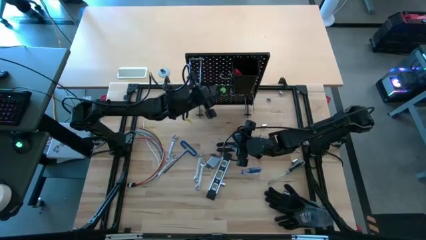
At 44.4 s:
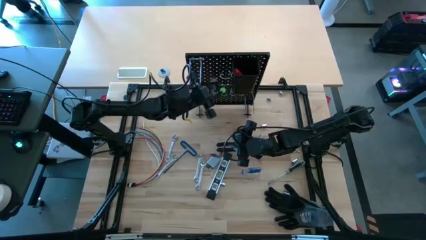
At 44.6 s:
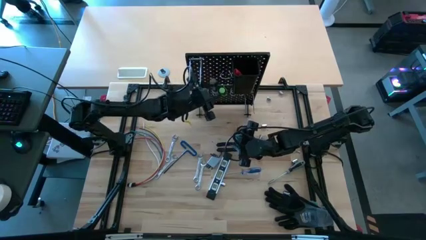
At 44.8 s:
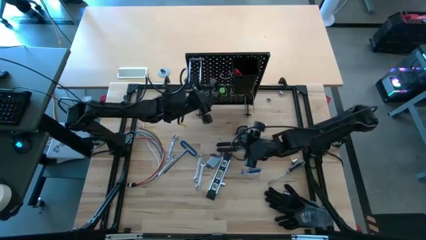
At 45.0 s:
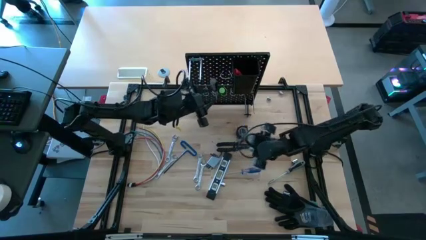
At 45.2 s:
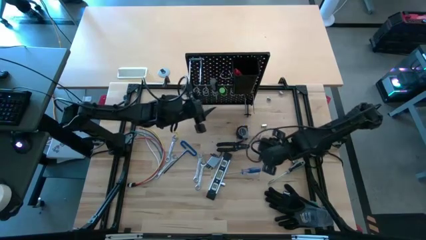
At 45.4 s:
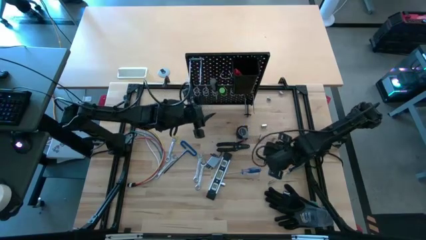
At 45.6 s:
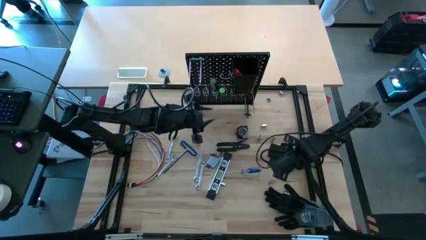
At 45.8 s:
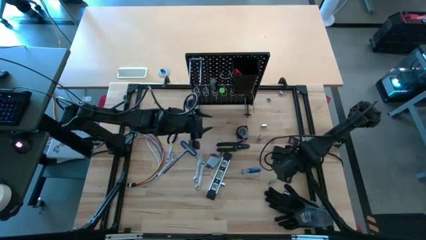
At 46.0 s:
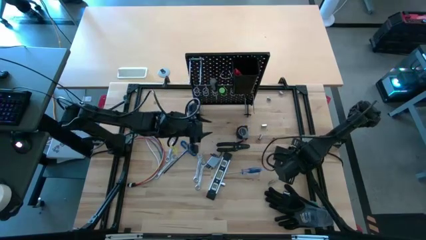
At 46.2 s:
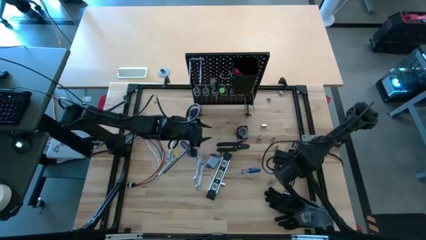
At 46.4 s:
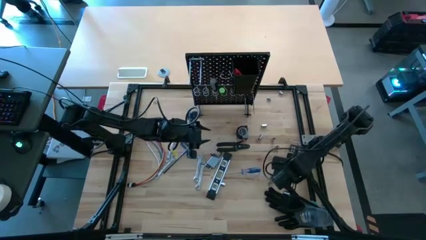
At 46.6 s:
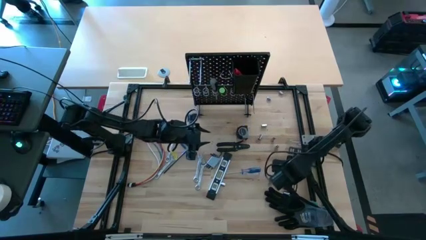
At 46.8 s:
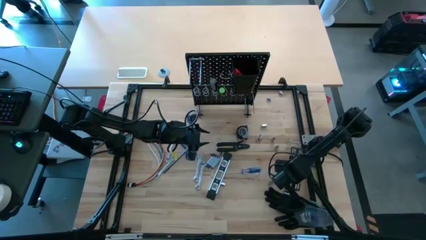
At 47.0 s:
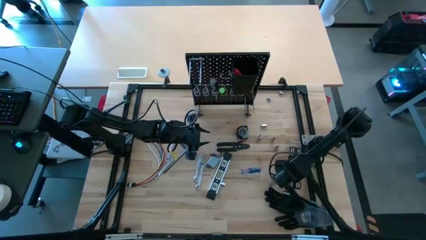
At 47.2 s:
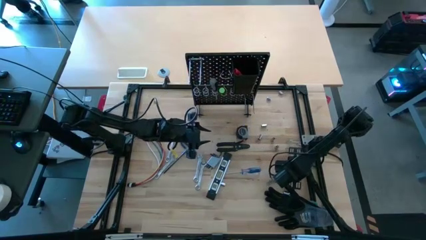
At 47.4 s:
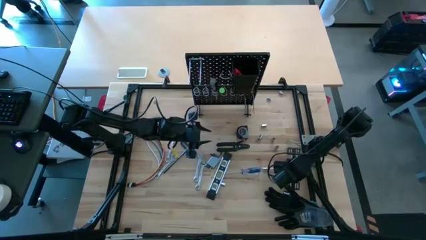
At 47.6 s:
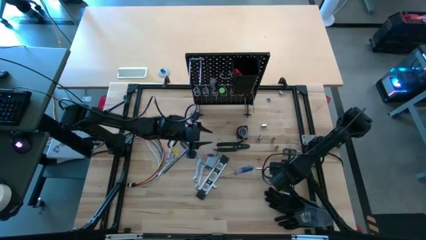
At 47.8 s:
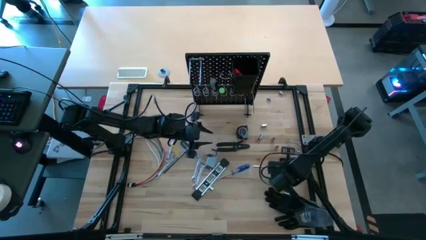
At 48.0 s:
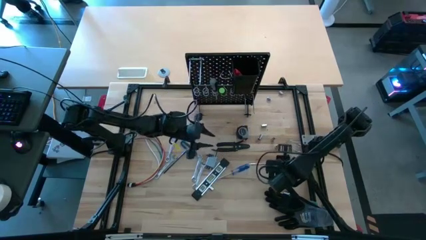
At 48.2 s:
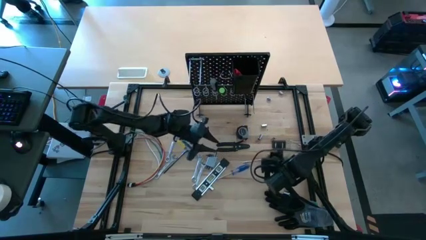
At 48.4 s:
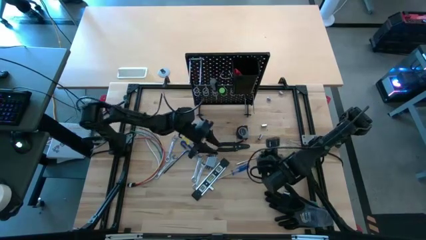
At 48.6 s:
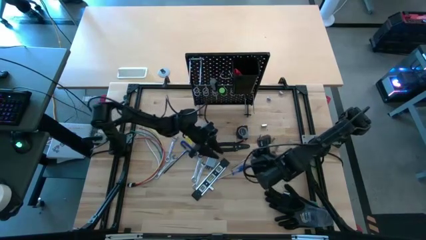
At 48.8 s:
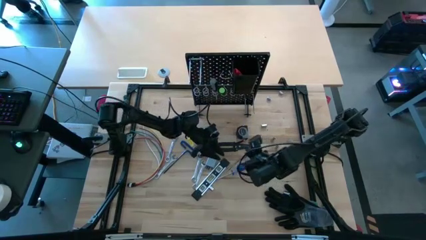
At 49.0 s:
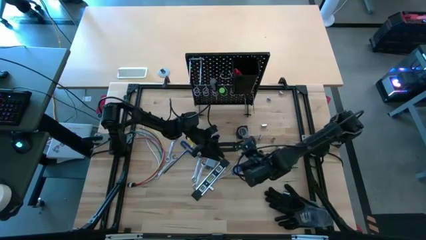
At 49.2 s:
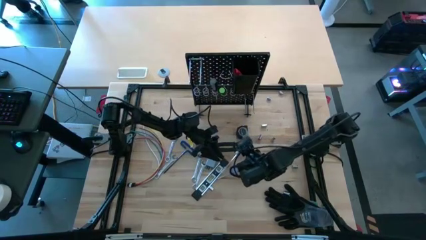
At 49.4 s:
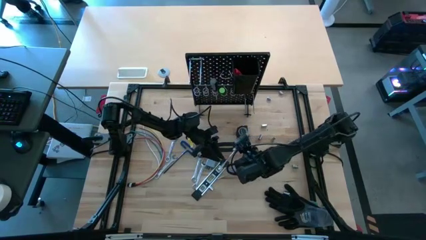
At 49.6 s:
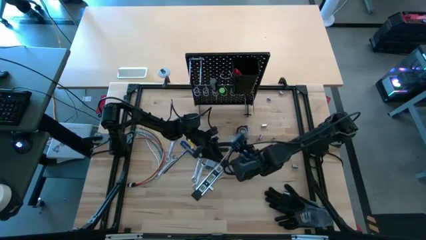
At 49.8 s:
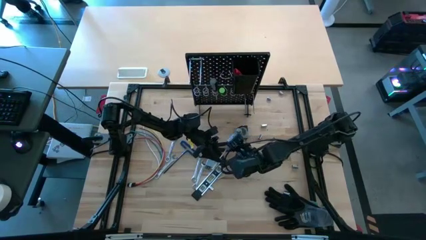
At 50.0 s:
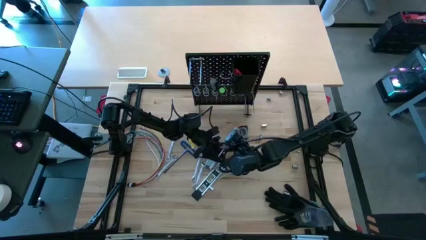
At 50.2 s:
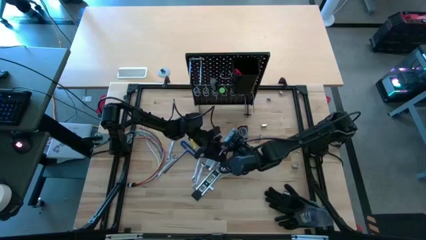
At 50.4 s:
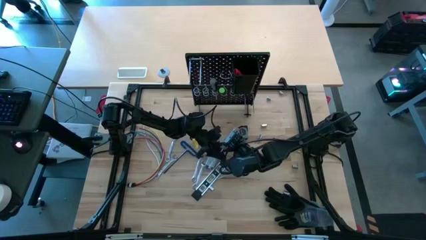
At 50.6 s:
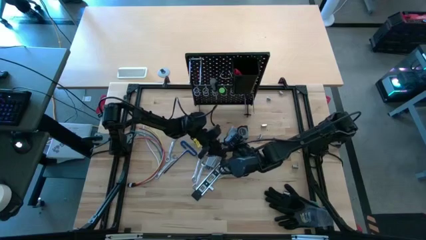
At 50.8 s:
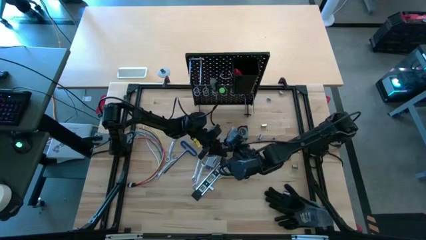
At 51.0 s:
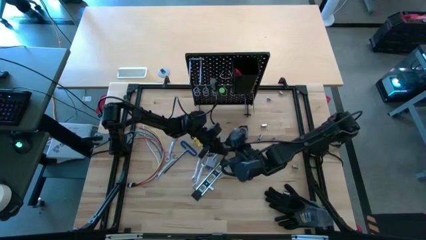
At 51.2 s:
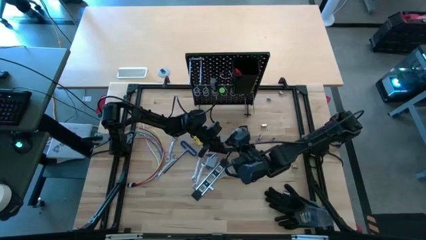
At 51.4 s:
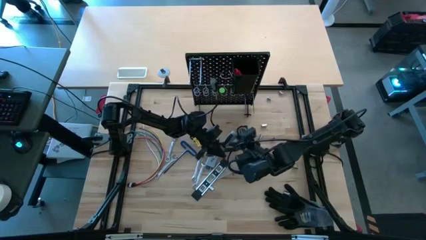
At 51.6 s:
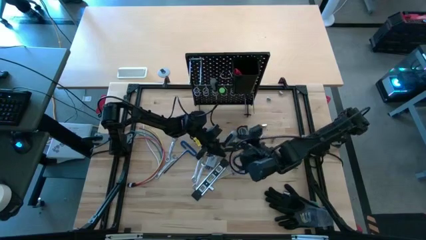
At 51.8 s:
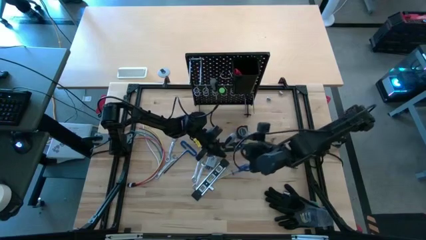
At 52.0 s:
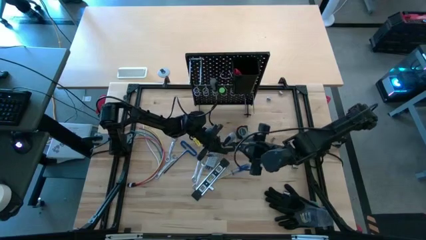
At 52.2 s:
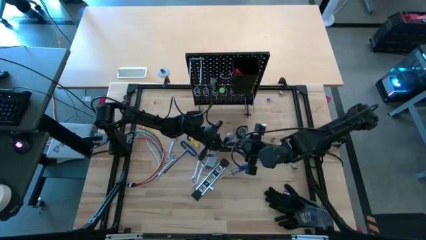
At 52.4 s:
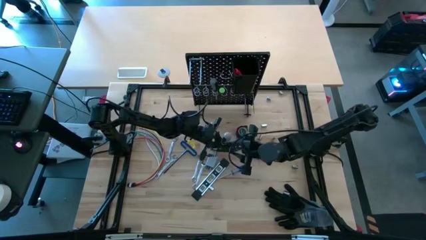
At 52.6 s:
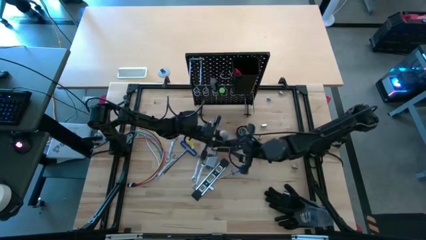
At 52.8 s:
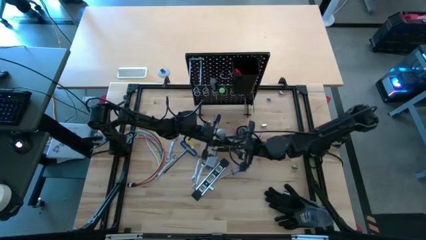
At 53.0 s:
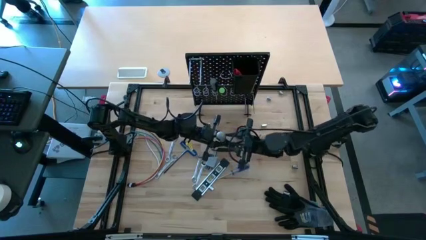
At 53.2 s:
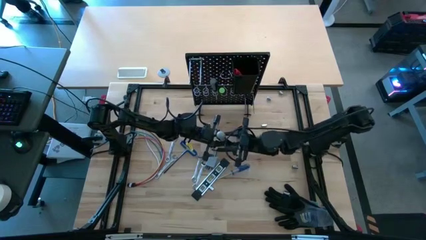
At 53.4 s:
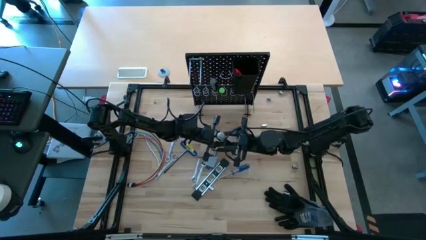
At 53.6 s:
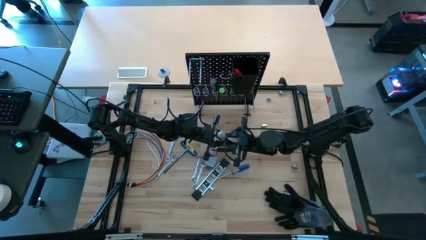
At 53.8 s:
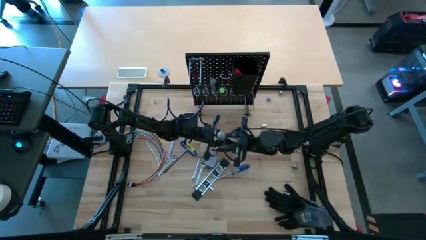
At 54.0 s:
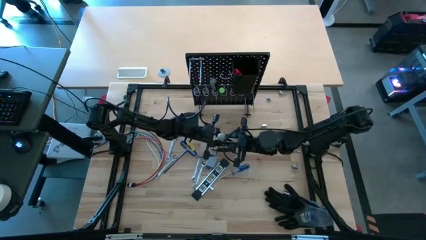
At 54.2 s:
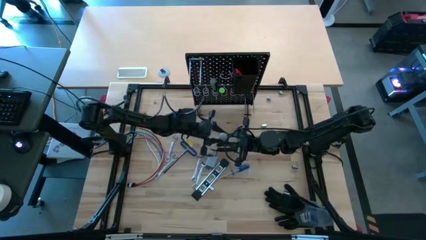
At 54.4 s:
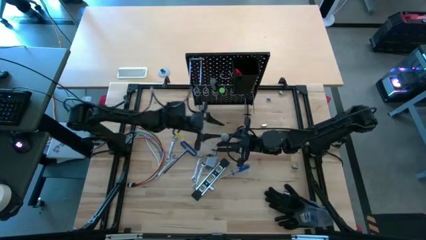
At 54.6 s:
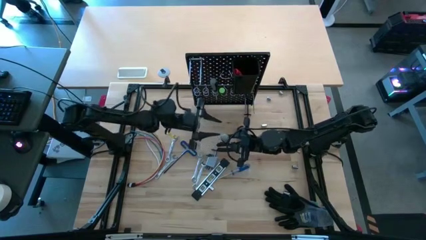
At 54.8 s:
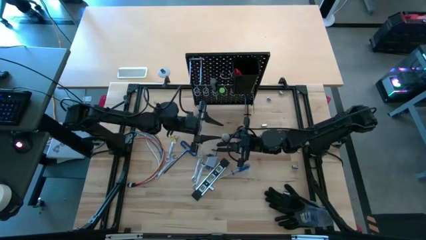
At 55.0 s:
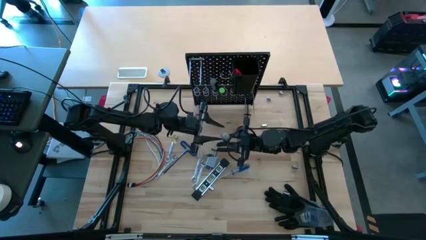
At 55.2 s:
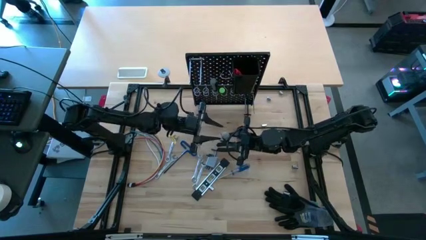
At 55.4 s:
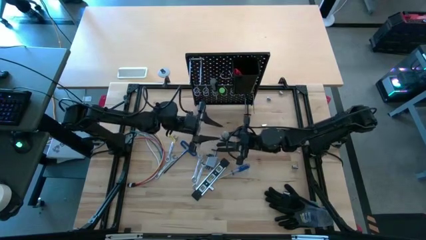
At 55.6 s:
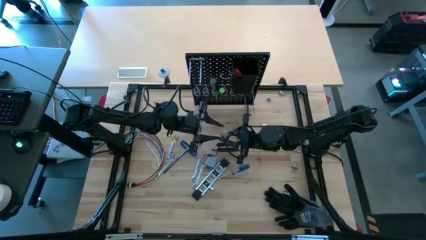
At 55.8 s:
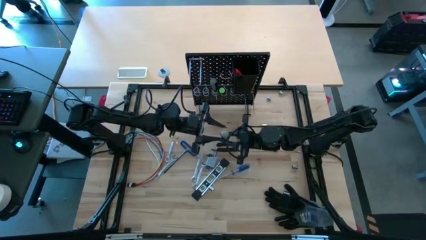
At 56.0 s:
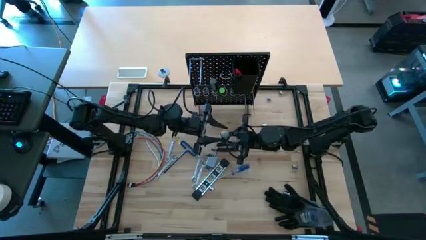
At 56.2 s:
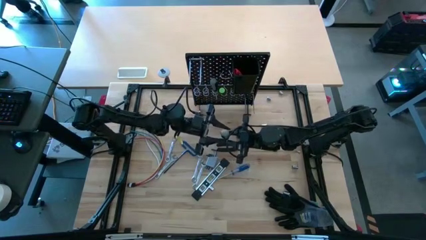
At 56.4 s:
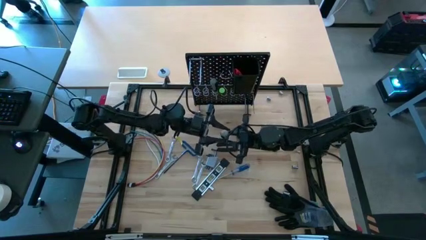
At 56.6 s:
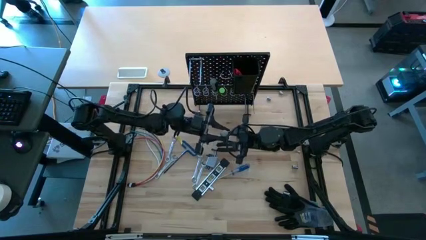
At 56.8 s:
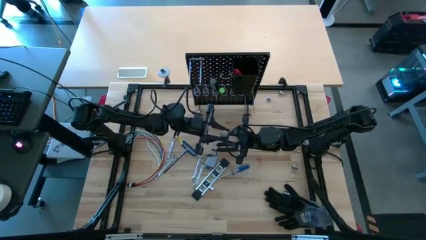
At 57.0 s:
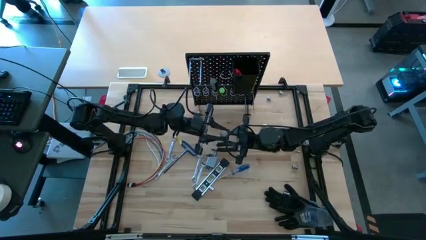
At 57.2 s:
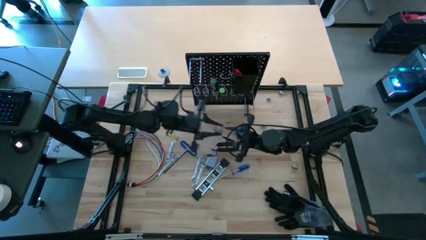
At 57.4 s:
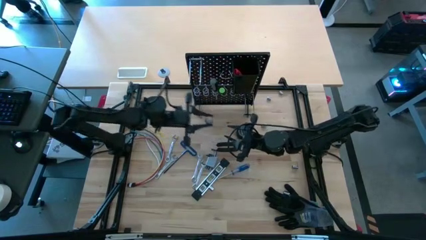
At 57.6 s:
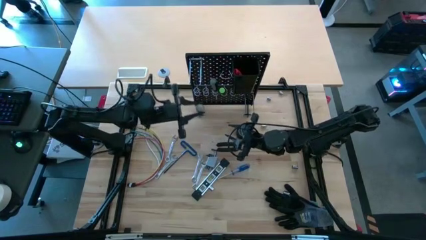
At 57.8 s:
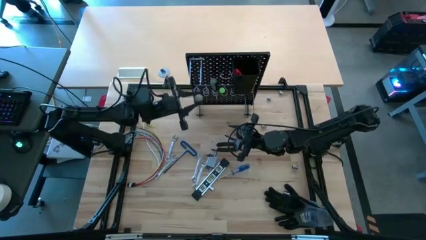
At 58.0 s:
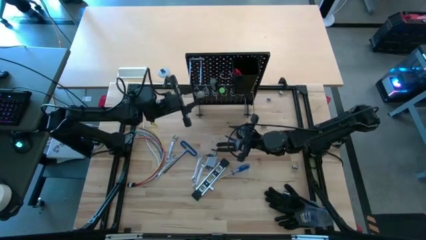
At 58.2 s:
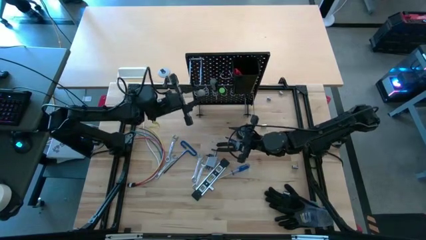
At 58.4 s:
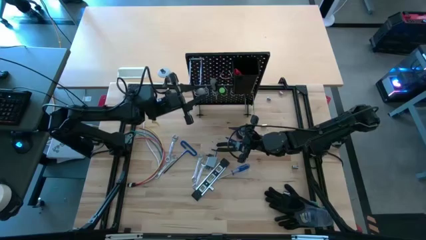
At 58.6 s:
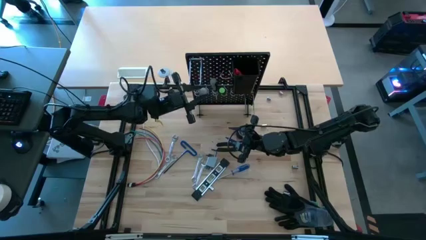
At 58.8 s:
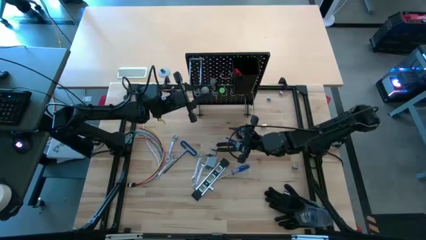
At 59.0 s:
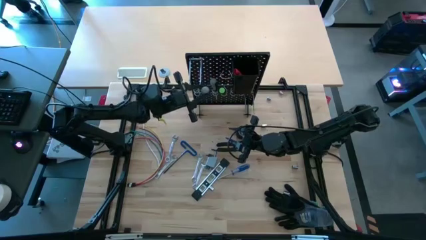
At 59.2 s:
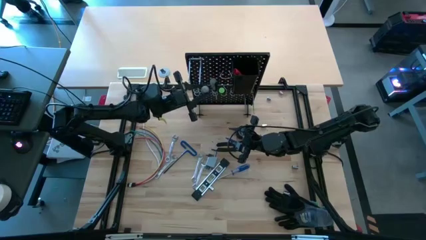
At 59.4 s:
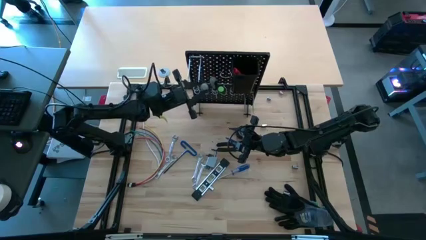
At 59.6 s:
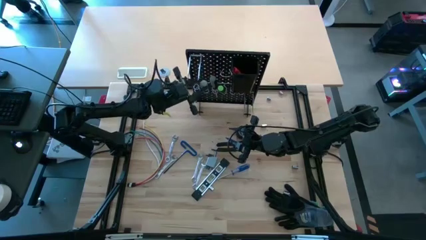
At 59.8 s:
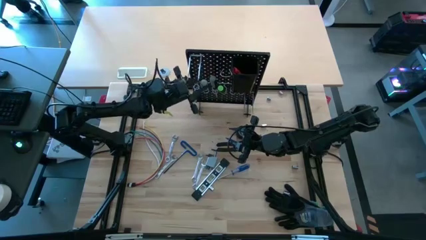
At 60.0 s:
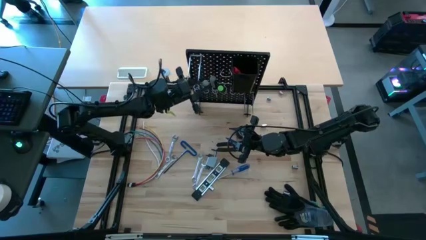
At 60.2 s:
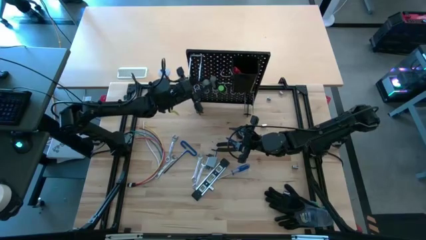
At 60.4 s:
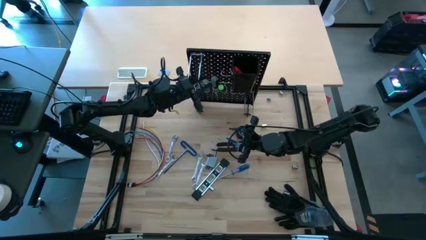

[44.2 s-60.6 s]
Task: Hang tools onto peg board
Hang the gray screwdriver on the peg board
